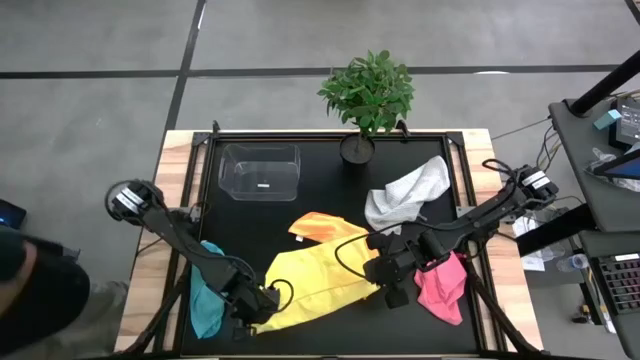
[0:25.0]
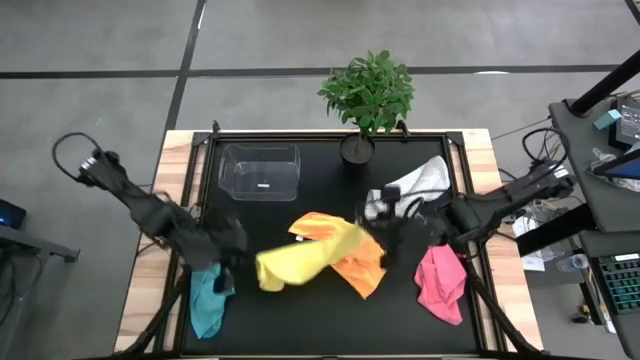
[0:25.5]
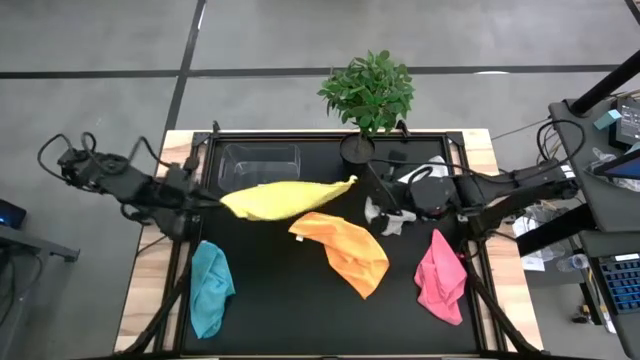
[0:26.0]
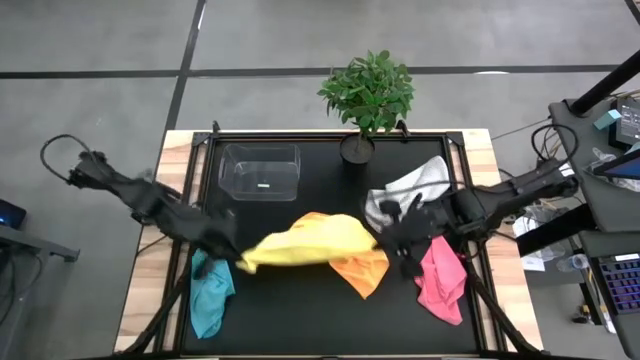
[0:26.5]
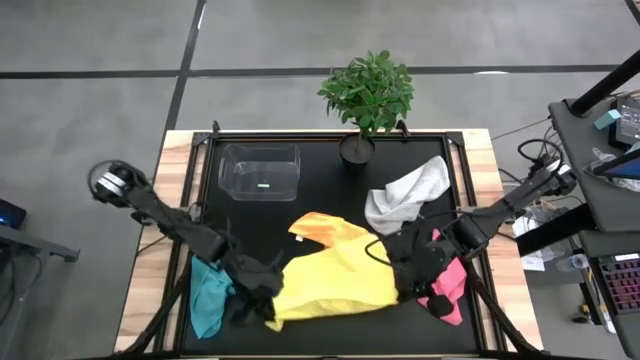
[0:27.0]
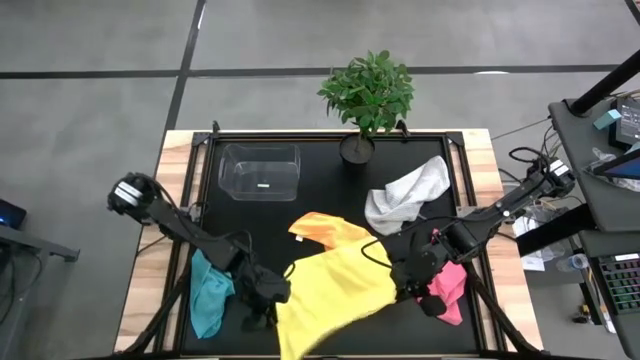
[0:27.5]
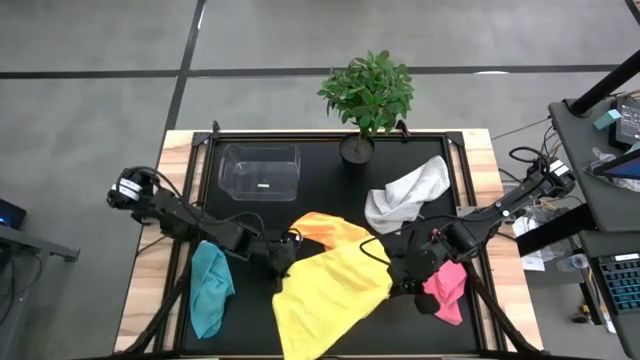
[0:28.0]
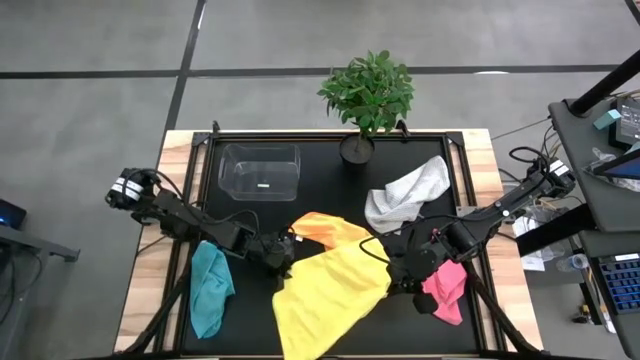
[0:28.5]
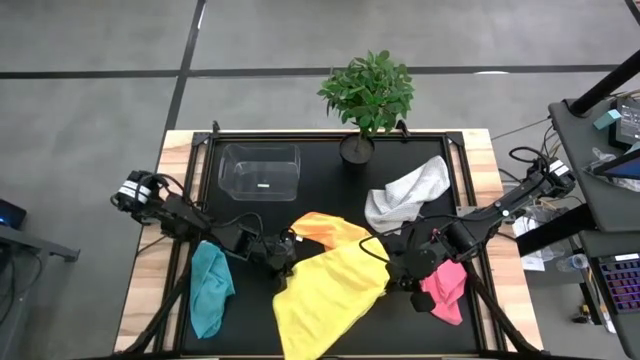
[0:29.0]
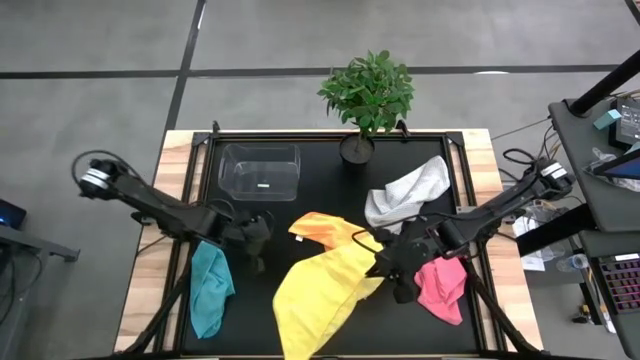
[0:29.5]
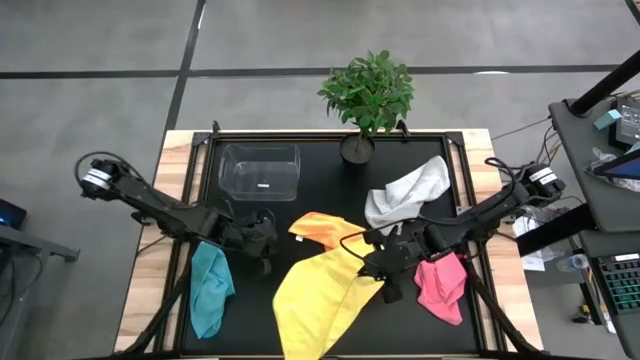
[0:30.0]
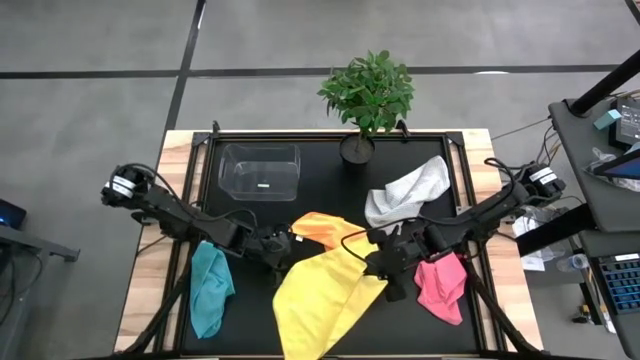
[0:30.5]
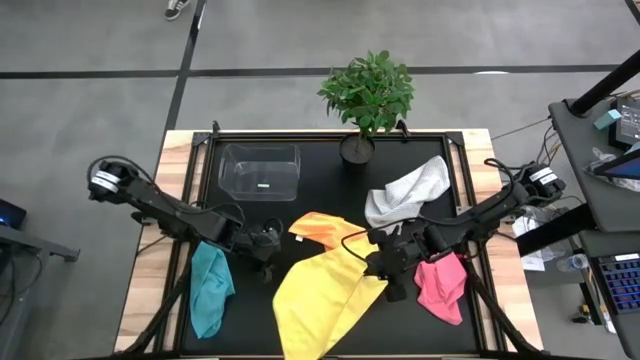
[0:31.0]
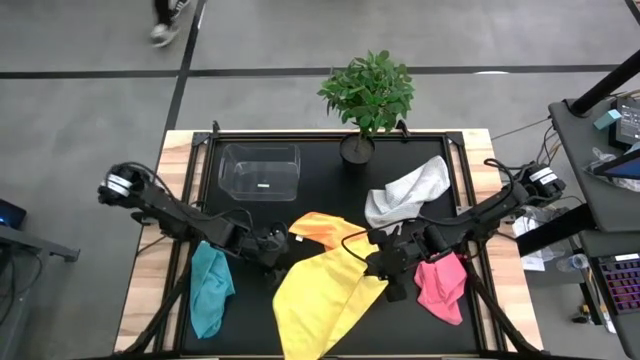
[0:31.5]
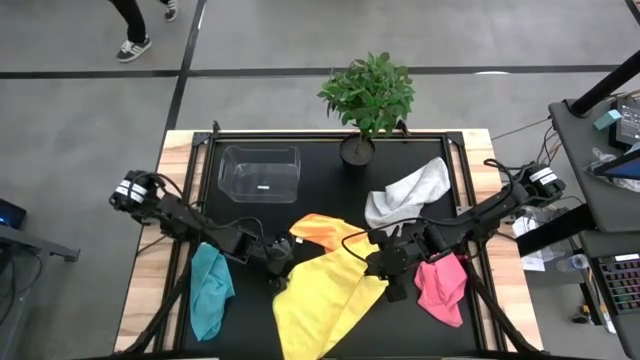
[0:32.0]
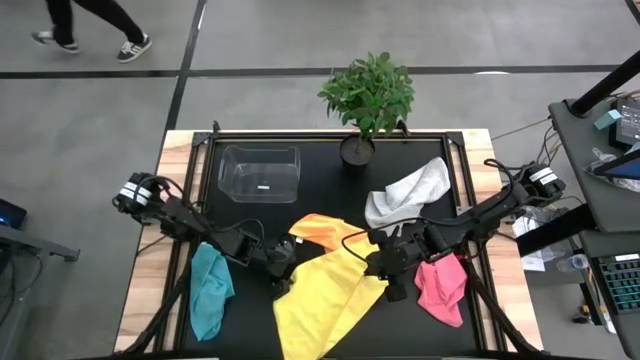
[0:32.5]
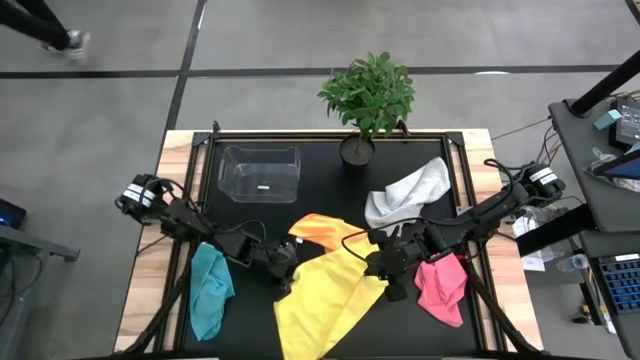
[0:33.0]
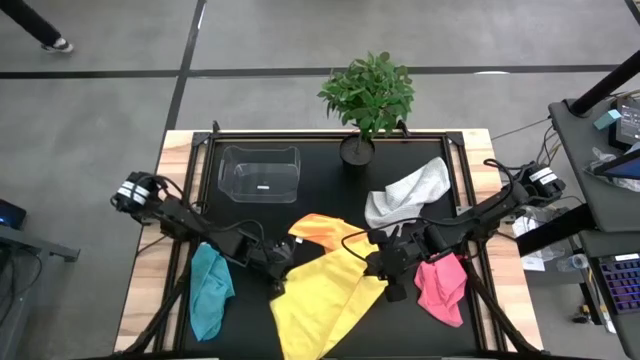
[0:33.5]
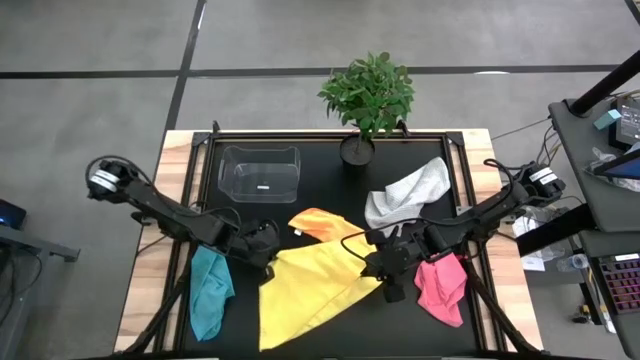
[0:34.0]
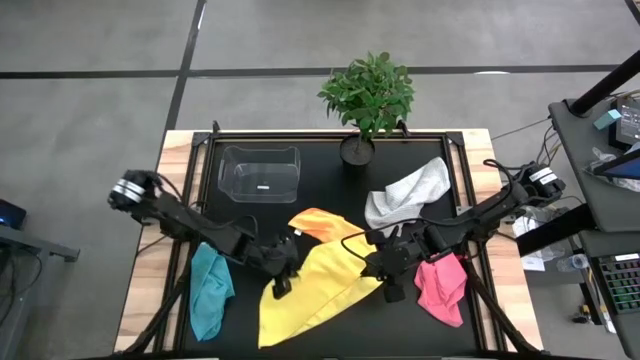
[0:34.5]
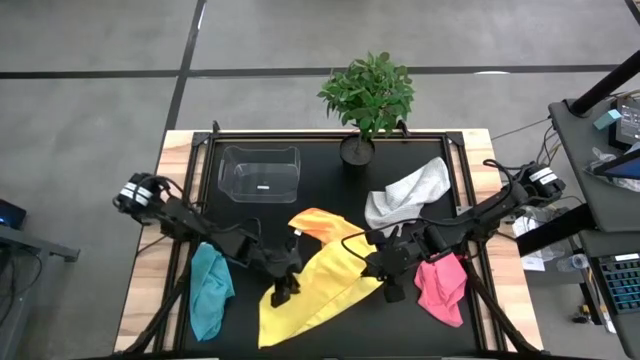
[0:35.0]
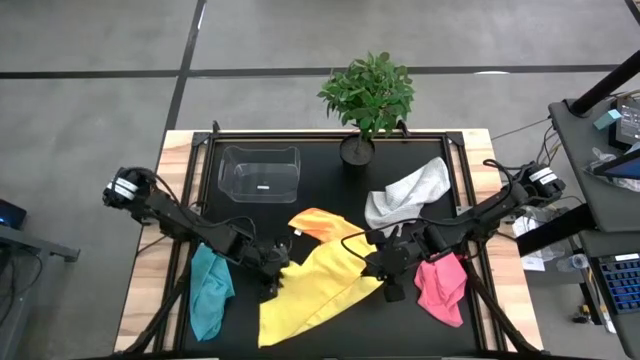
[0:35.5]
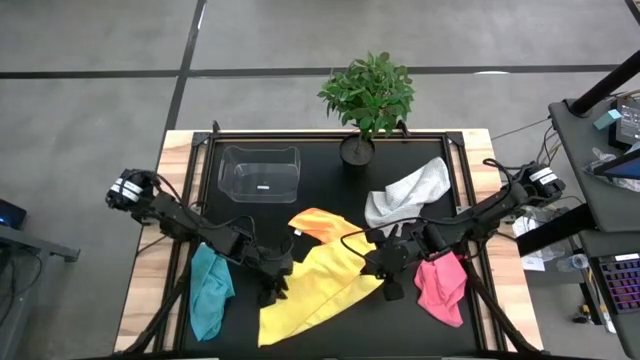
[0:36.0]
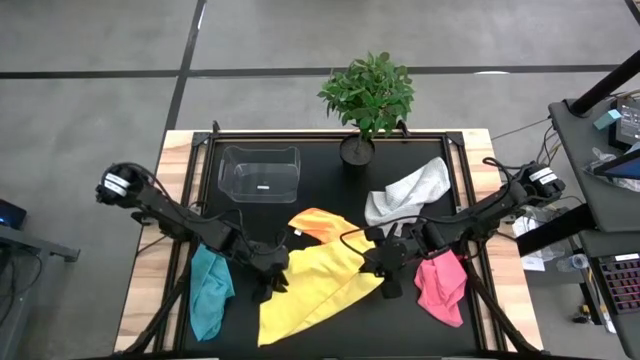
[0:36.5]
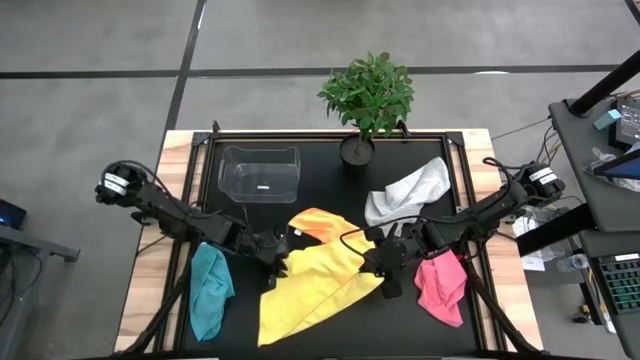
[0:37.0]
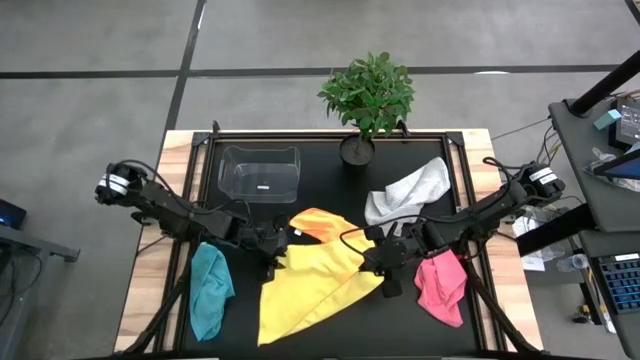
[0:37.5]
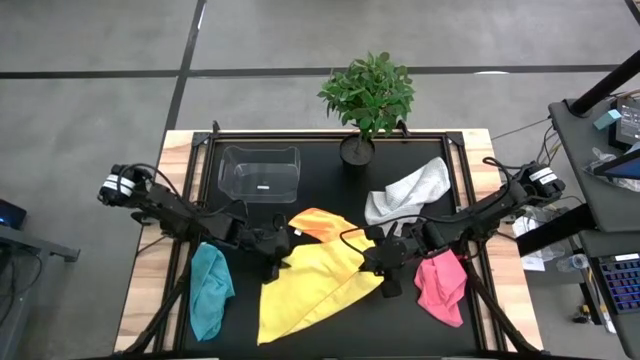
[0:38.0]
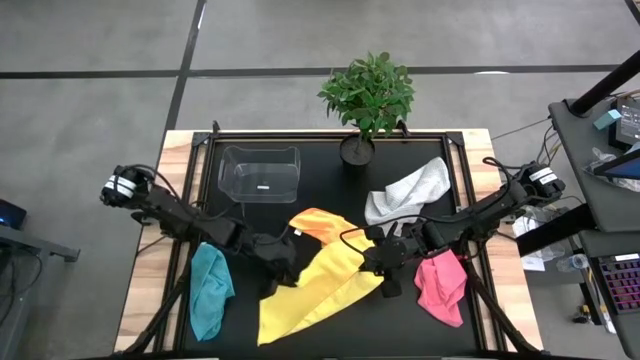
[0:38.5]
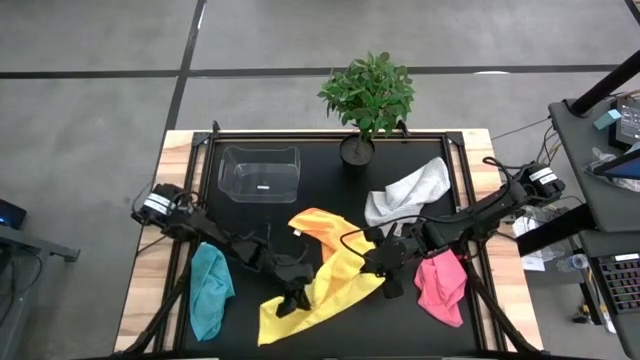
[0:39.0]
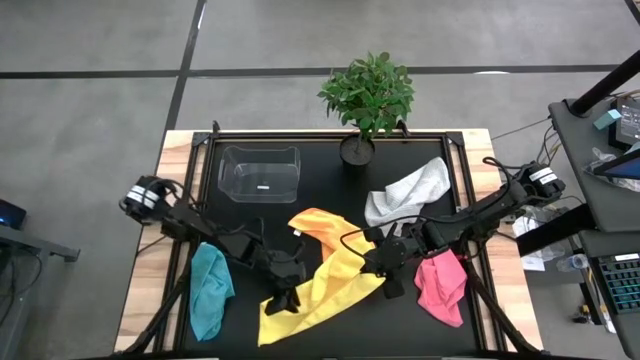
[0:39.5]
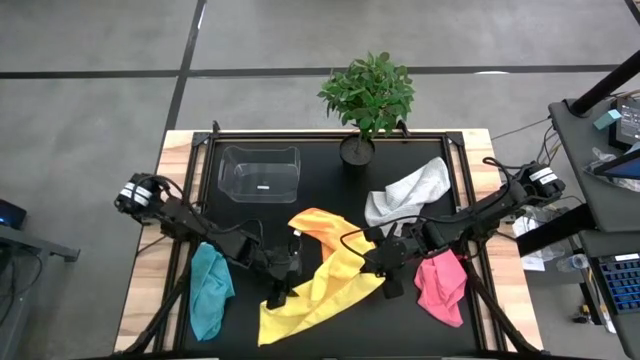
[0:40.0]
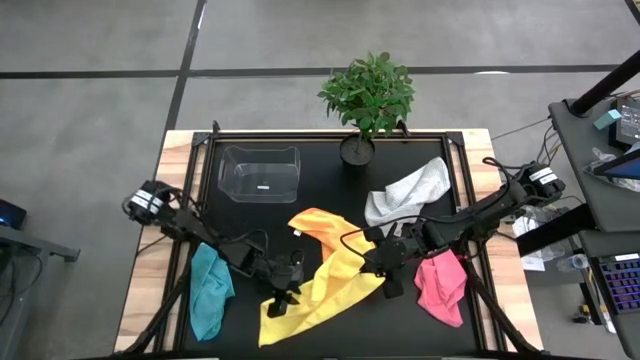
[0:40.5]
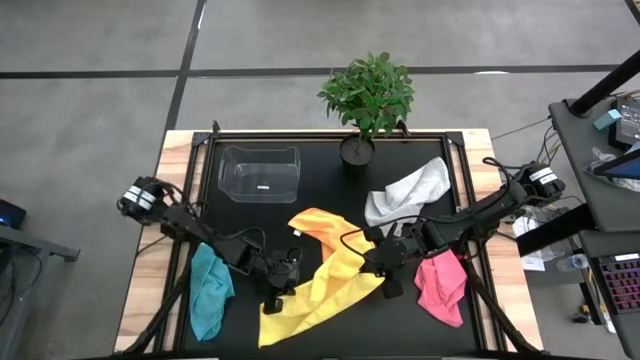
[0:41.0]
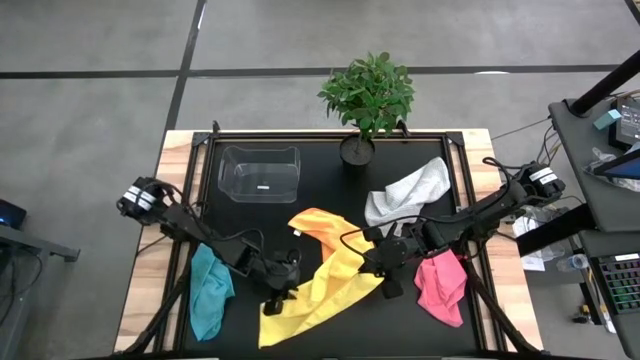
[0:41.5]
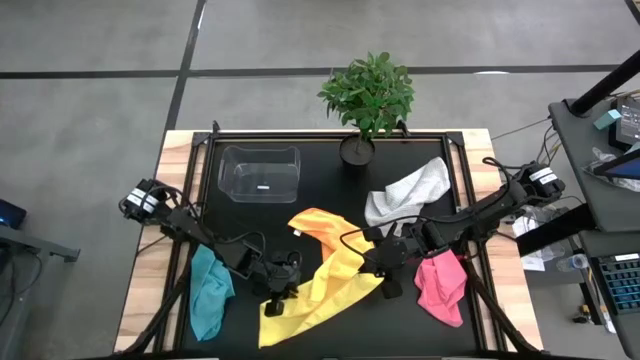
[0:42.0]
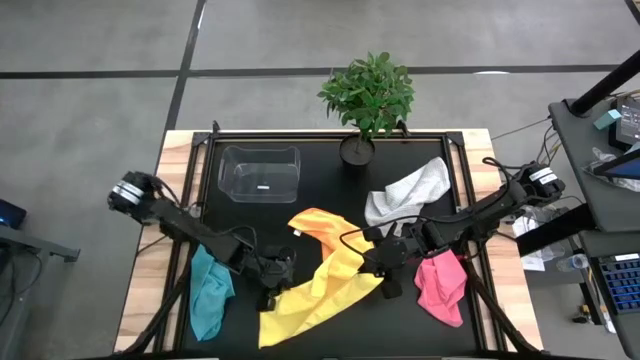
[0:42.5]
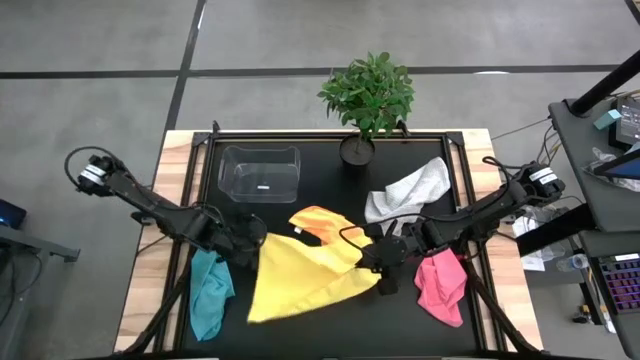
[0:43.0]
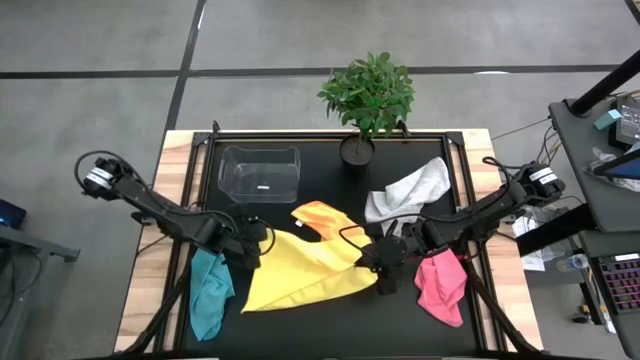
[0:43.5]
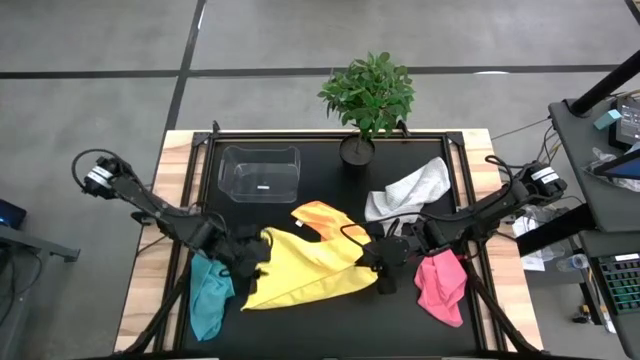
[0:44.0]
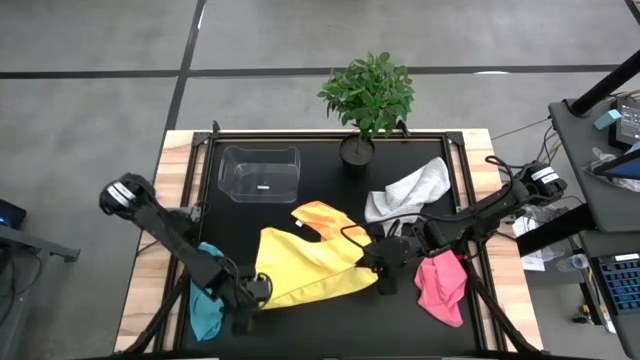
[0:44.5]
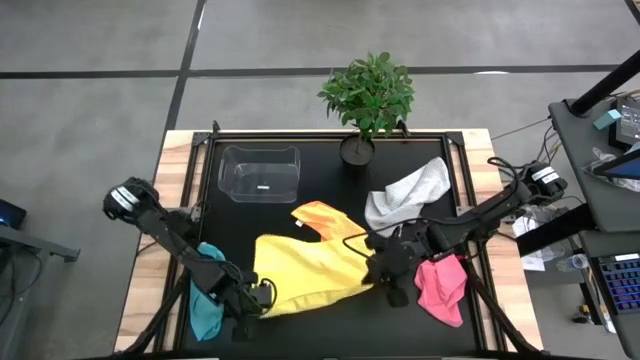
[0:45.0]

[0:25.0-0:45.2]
Task: Fold microfiber towels
Fold the yellow towel
